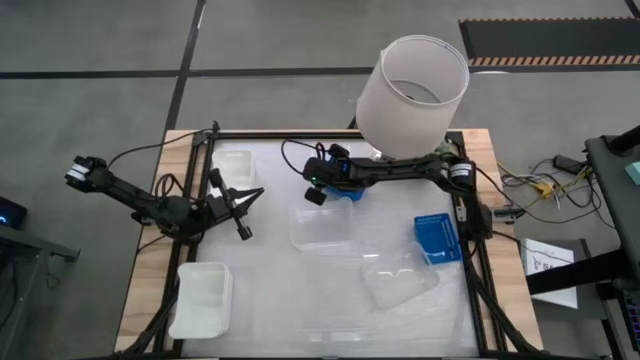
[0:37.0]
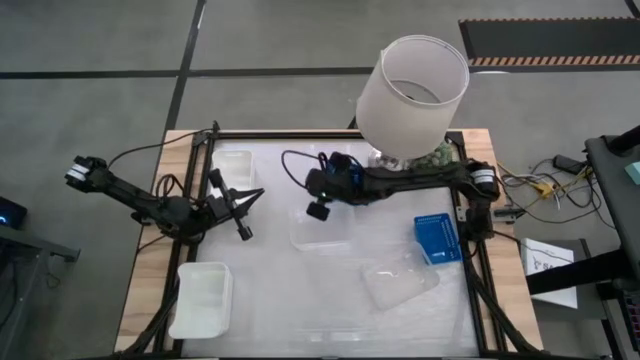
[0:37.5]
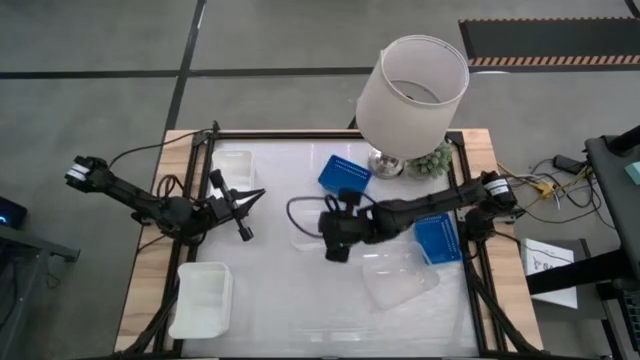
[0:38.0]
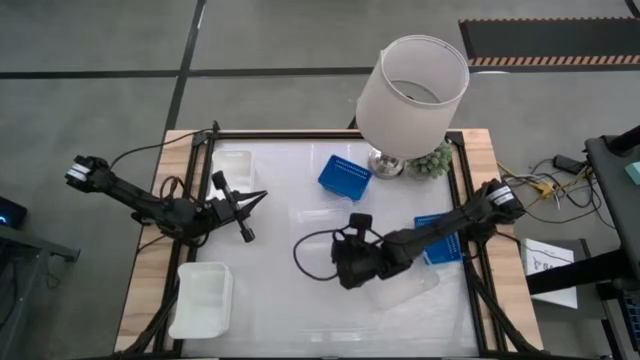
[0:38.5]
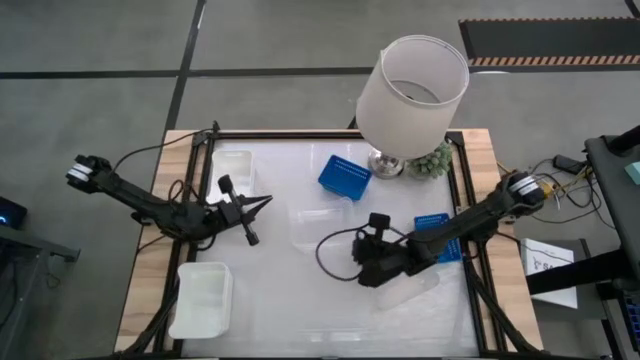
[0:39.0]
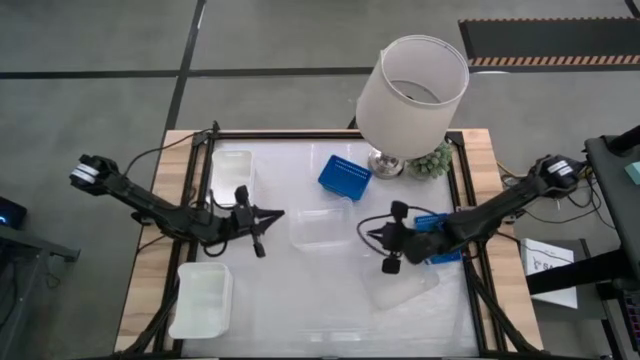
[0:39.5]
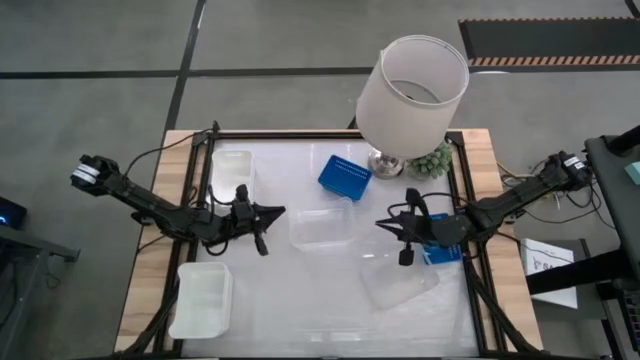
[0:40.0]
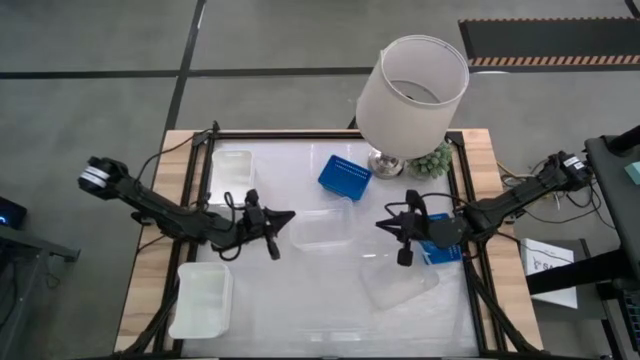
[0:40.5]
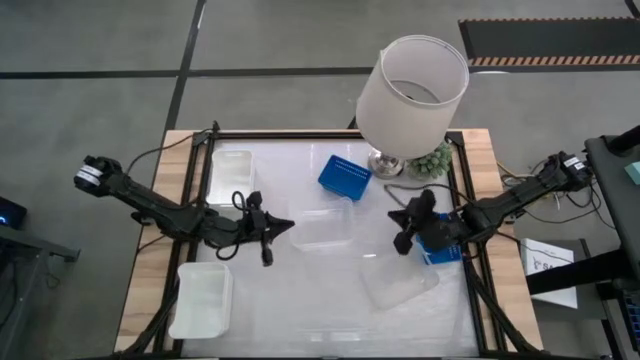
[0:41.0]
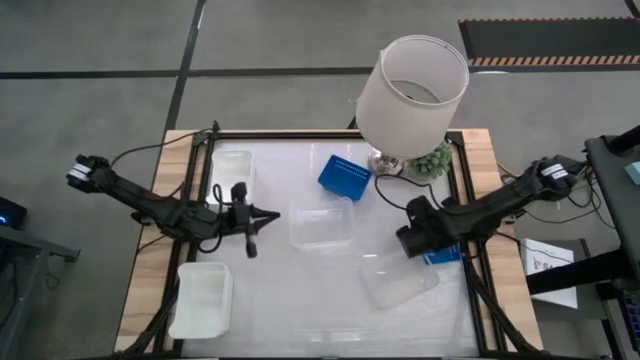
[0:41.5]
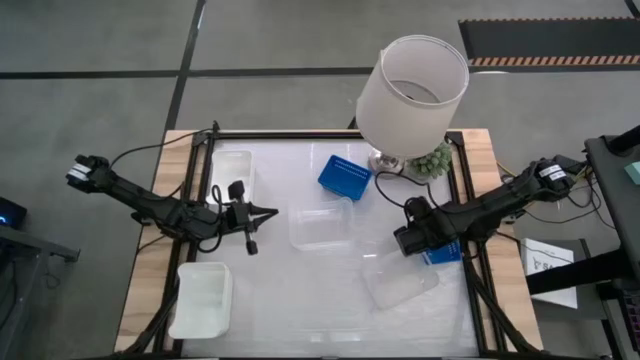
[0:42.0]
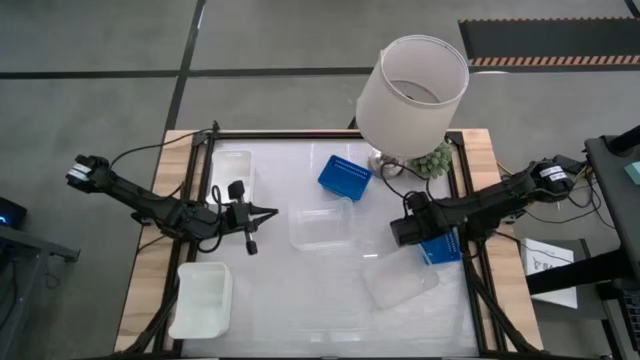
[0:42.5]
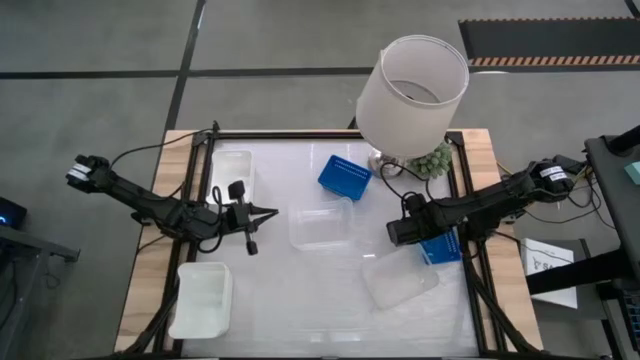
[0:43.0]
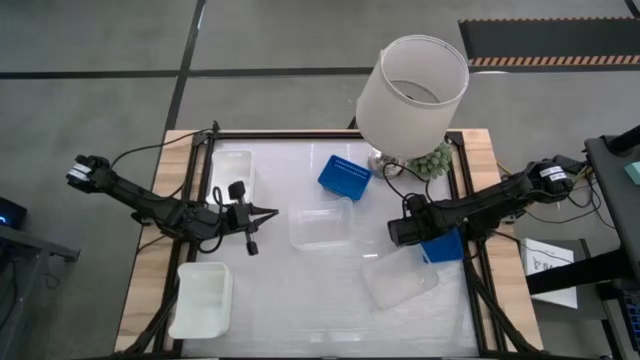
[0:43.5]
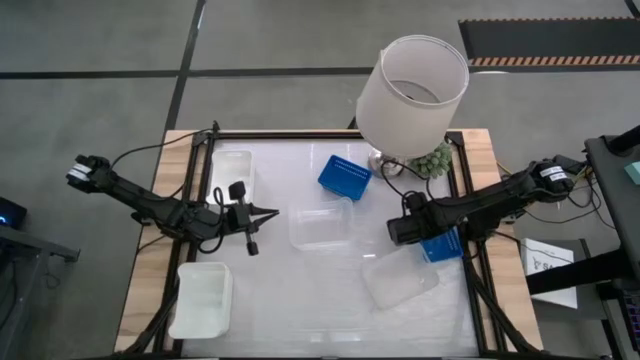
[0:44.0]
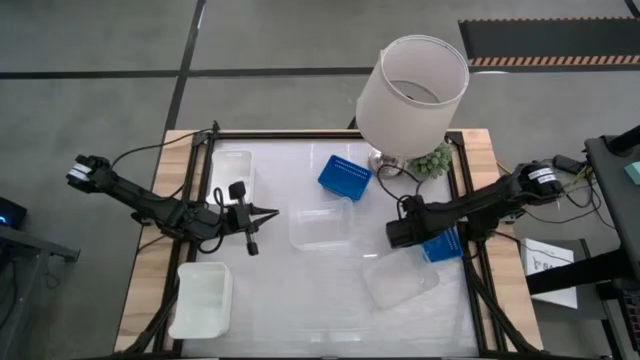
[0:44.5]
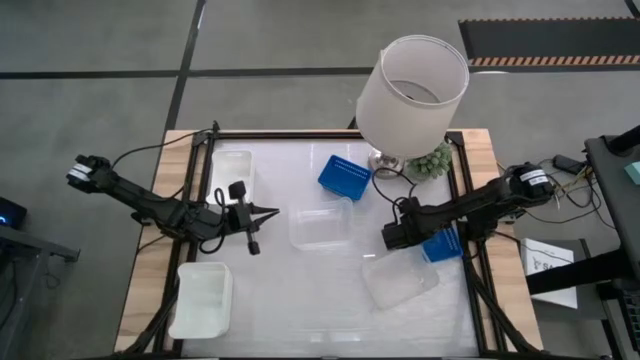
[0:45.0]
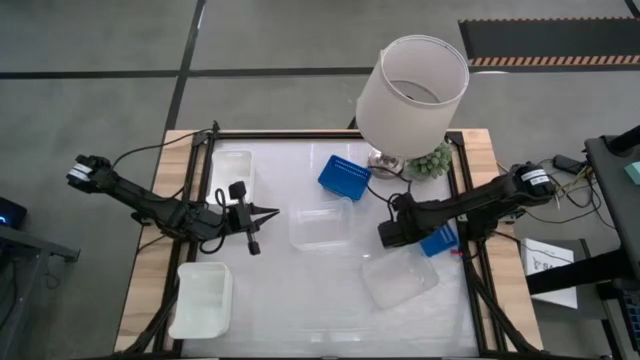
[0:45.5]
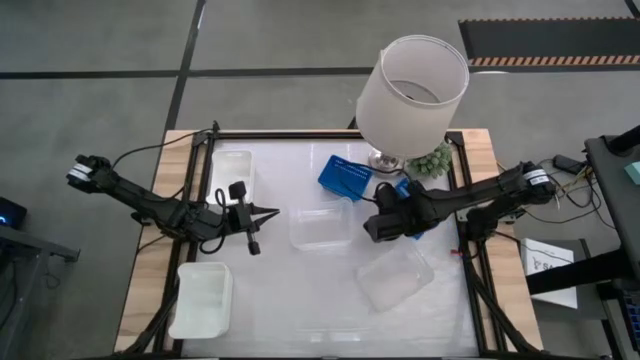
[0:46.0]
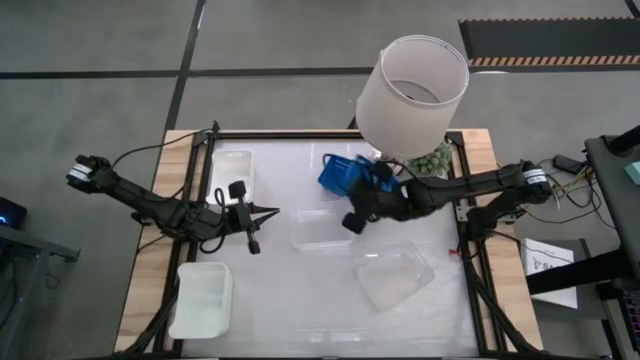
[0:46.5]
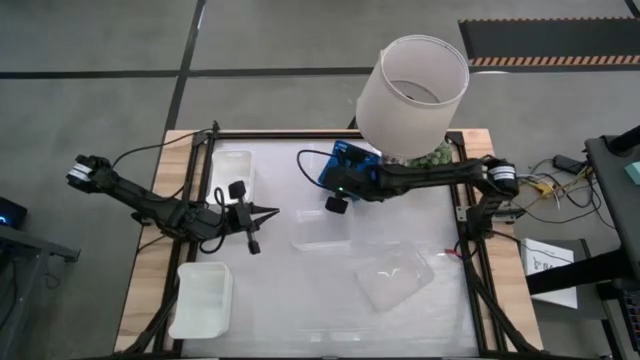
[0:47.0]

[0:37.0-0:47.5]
Stack the bottom blue bin on top of the top blue bin

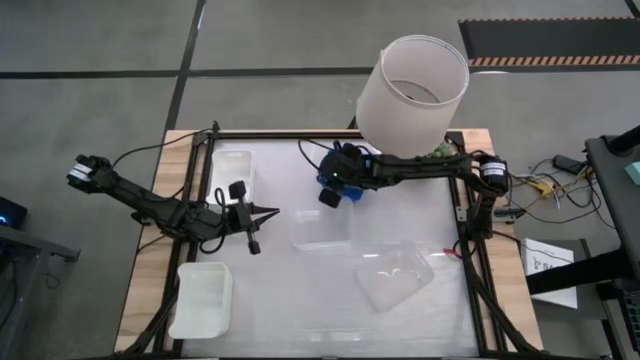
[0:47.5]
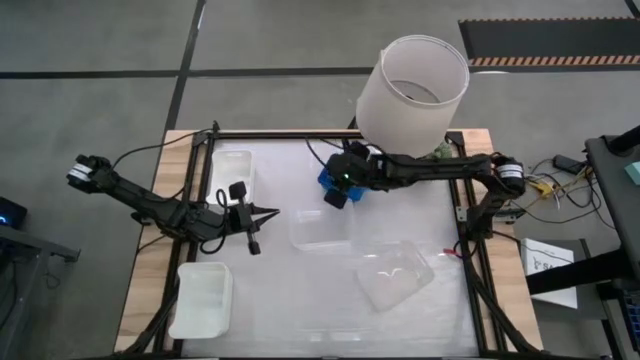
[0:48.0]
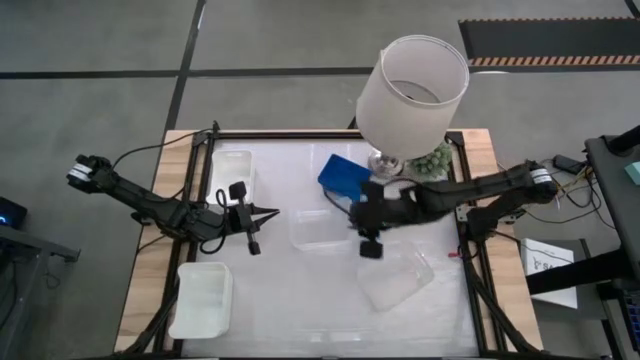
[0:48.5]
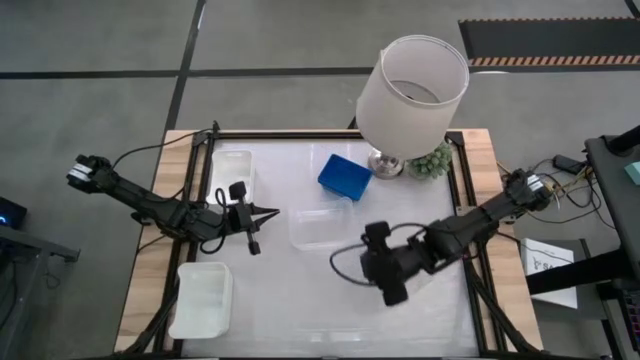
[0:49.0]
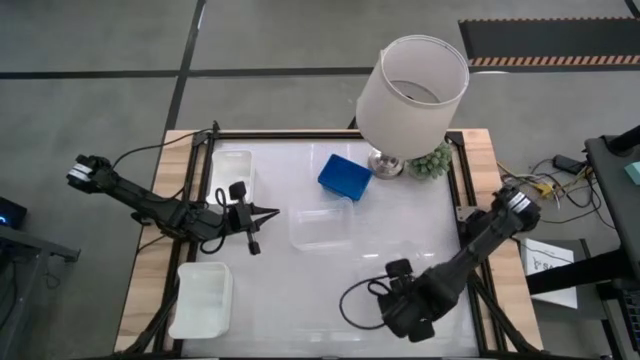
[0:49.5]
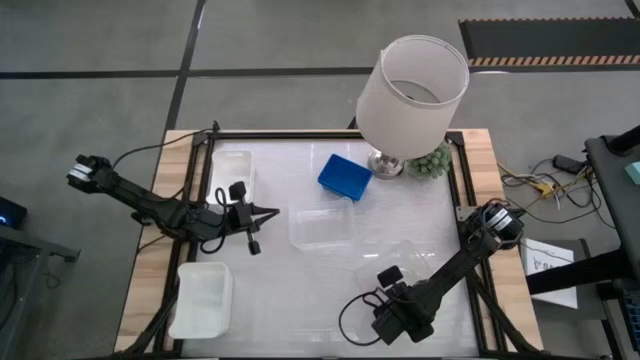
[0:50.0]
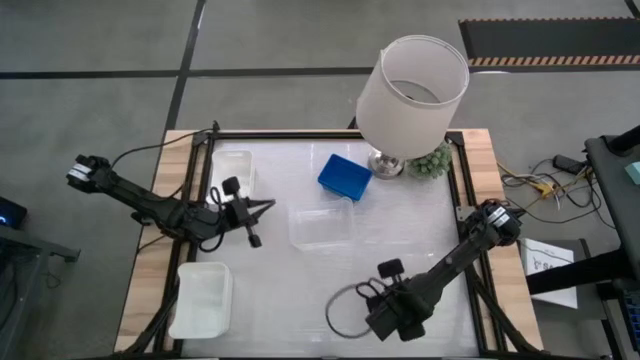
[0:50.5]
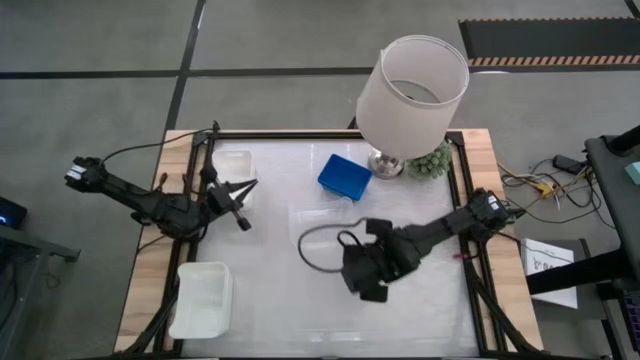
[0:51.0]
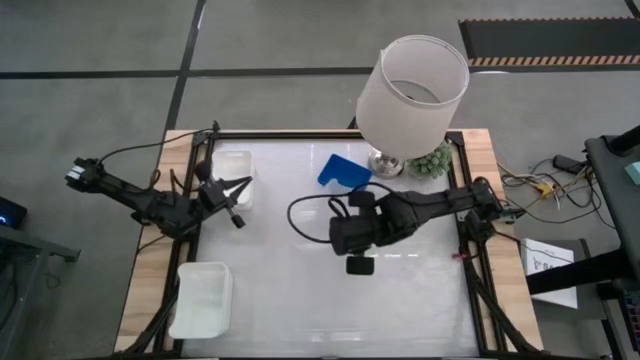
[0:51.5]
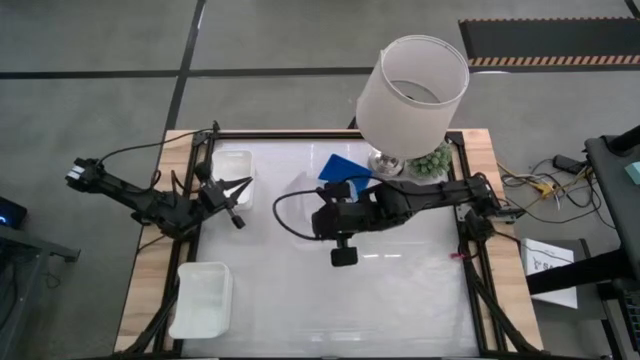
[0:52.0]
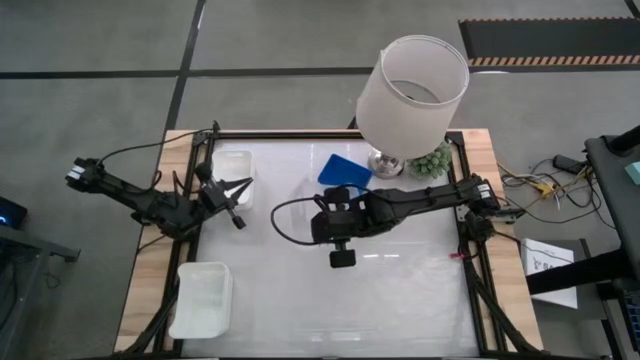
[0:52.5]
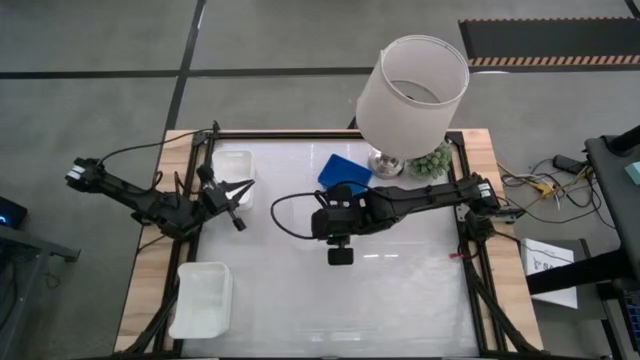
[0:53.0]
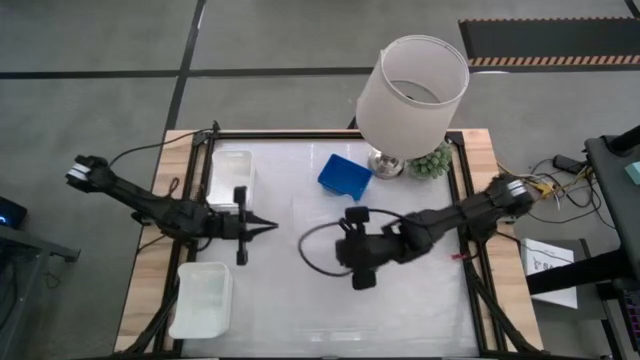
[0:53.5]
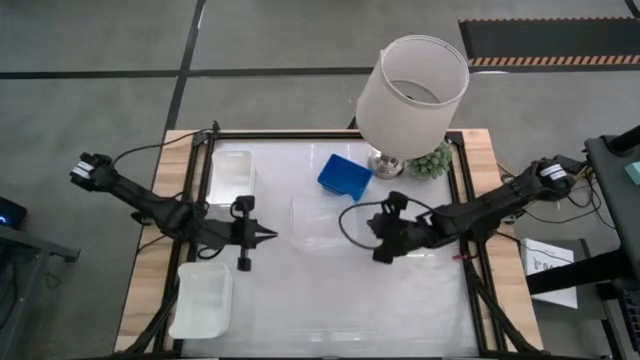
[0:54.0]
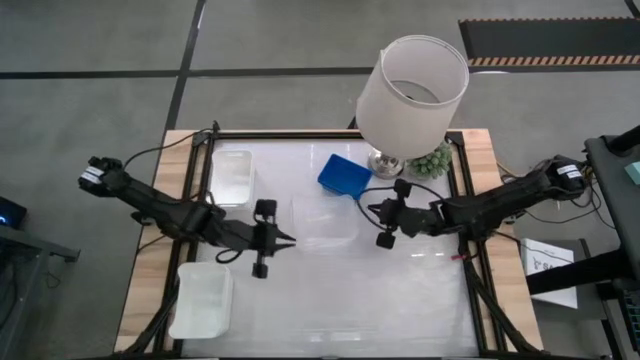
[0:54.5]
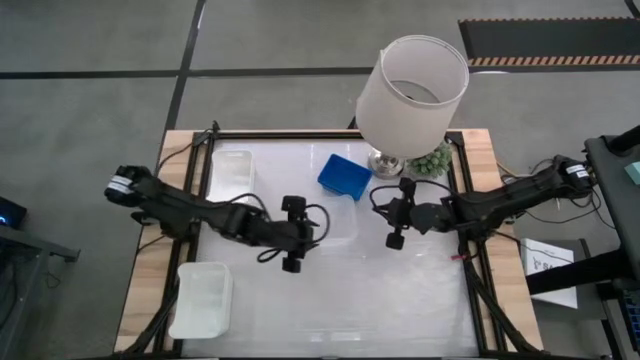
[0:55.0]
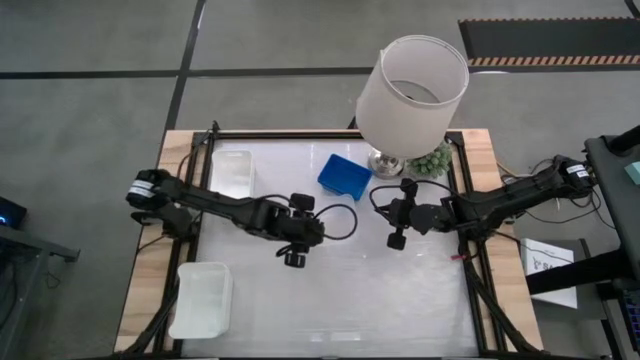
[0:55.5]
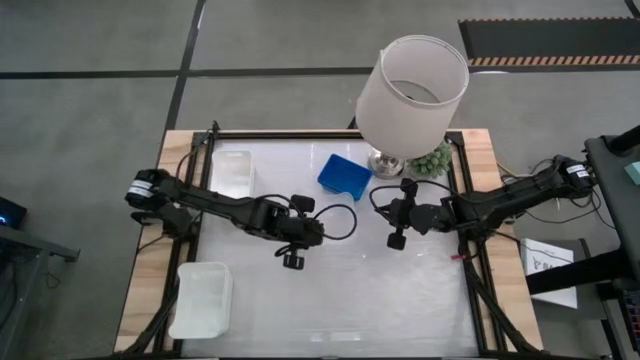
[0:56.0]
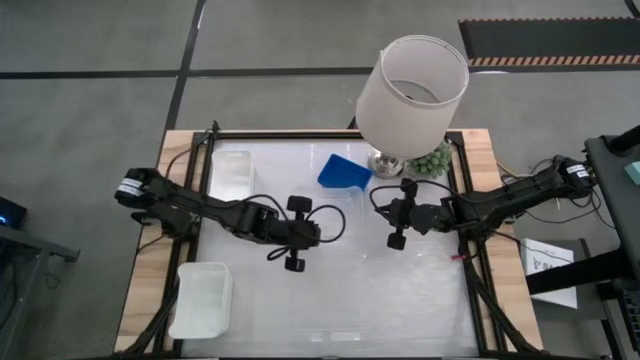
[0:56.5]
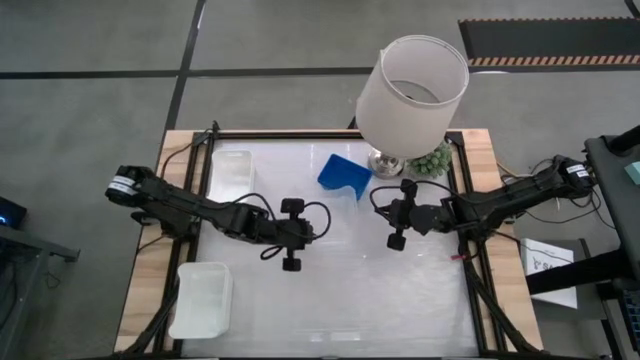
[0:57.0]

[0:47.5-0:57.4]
Stack the bottom transparent bin on top of the top transparent bin
